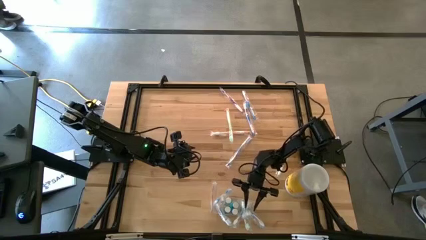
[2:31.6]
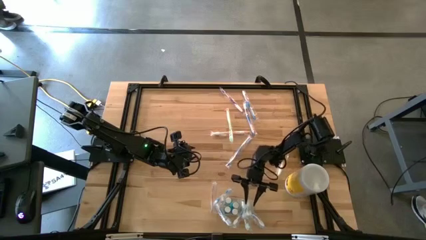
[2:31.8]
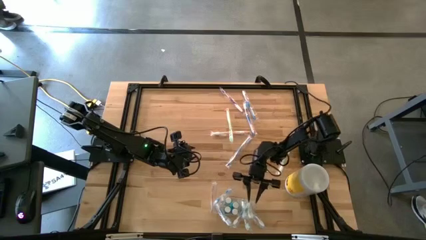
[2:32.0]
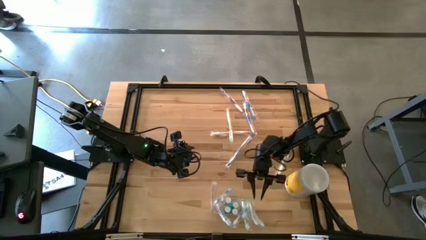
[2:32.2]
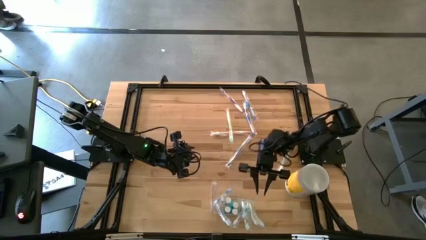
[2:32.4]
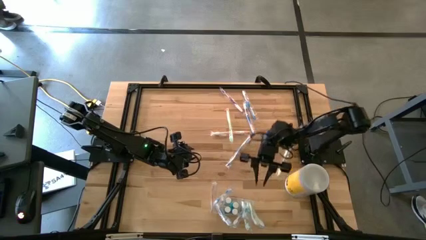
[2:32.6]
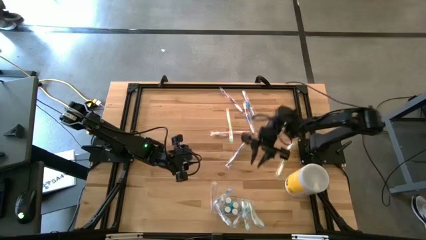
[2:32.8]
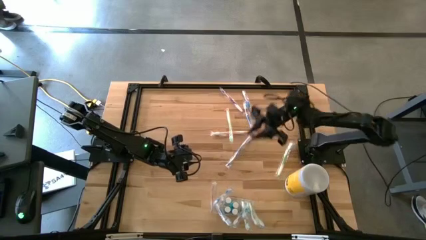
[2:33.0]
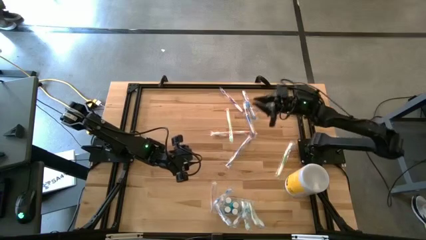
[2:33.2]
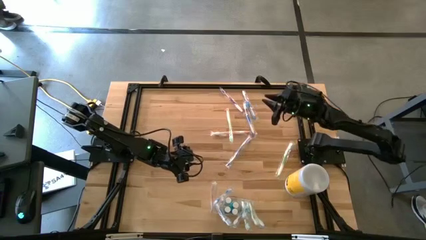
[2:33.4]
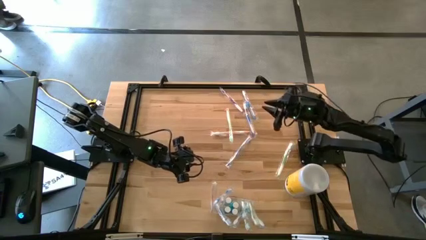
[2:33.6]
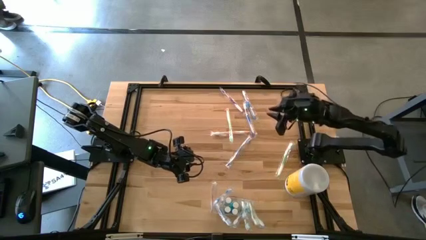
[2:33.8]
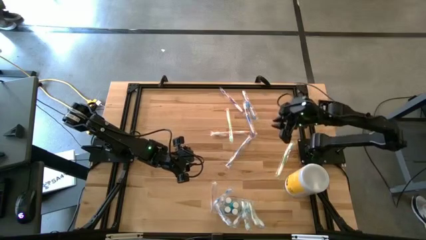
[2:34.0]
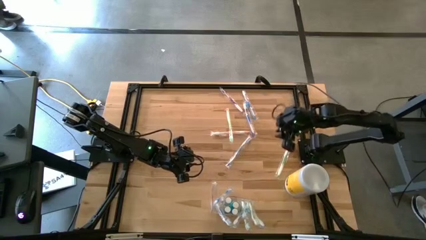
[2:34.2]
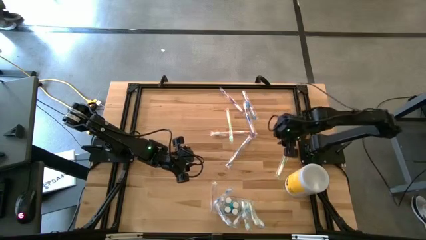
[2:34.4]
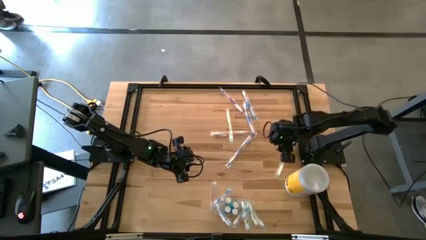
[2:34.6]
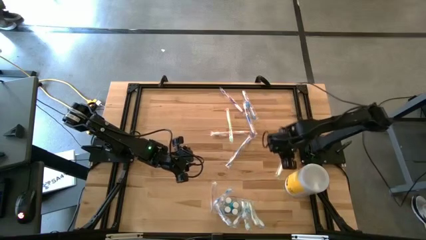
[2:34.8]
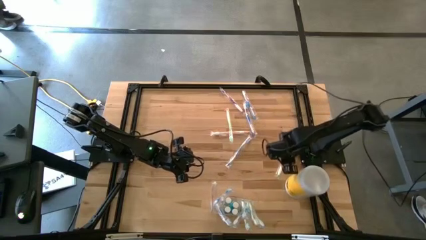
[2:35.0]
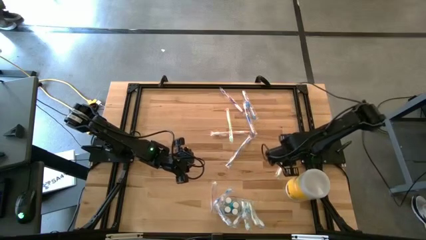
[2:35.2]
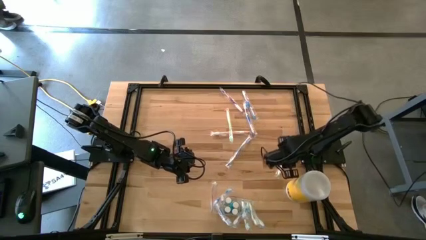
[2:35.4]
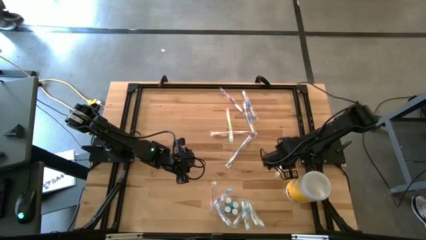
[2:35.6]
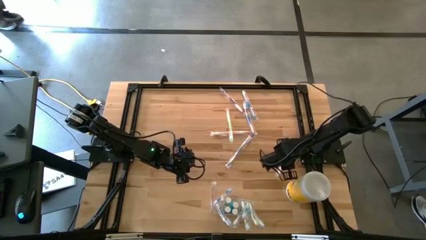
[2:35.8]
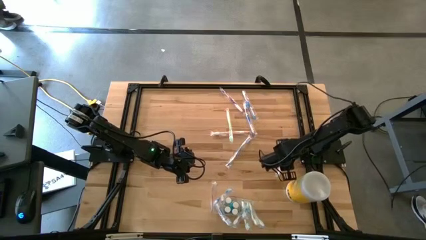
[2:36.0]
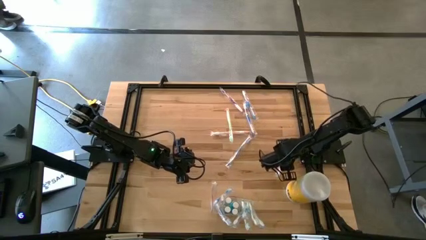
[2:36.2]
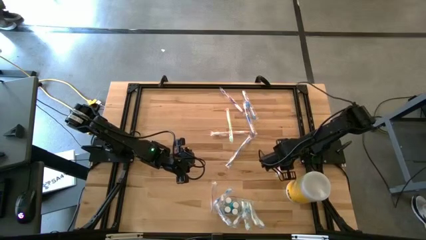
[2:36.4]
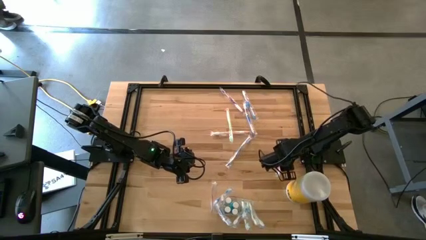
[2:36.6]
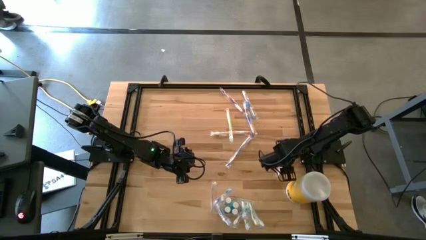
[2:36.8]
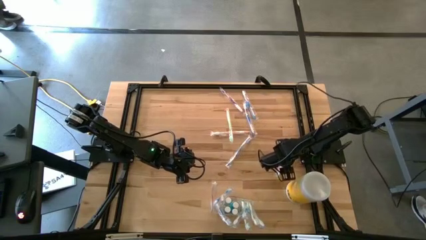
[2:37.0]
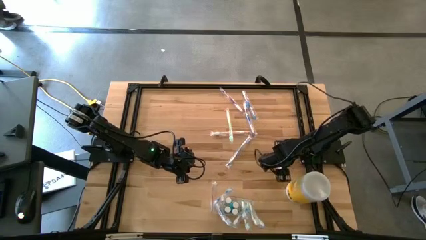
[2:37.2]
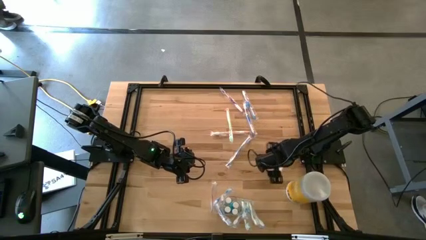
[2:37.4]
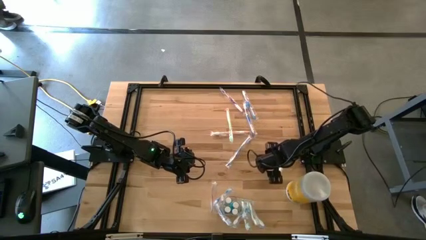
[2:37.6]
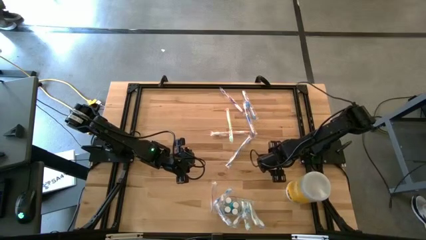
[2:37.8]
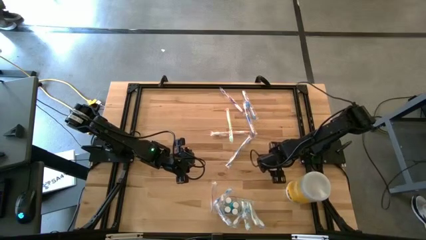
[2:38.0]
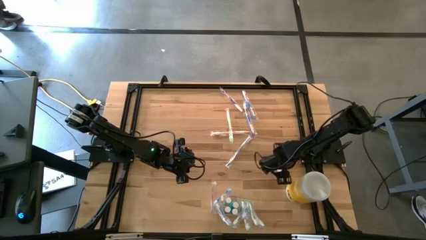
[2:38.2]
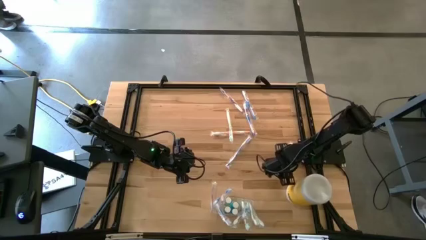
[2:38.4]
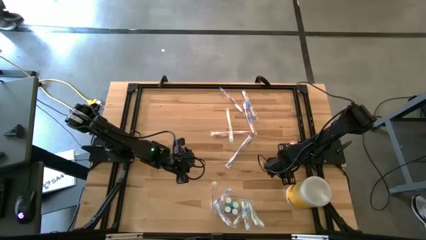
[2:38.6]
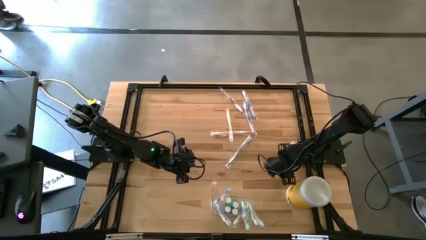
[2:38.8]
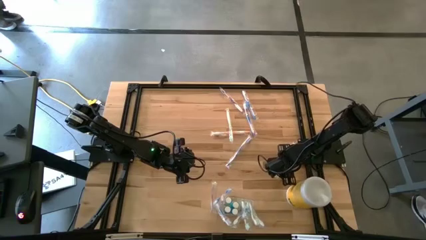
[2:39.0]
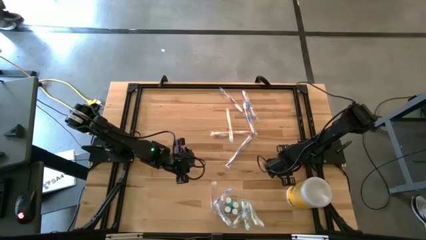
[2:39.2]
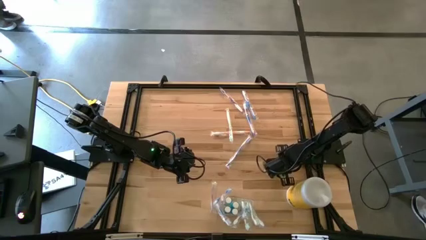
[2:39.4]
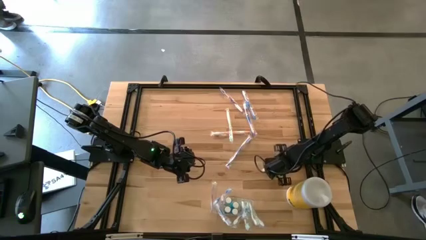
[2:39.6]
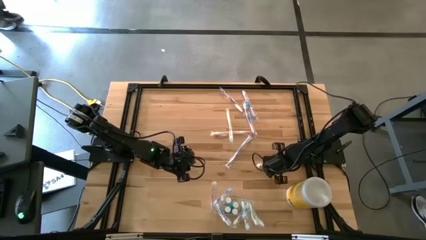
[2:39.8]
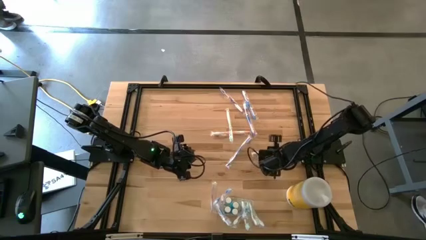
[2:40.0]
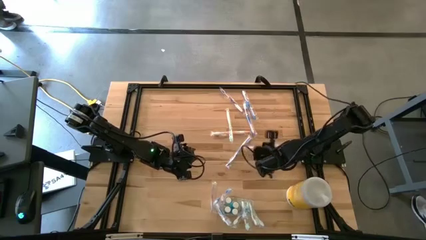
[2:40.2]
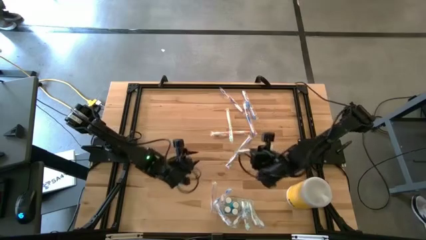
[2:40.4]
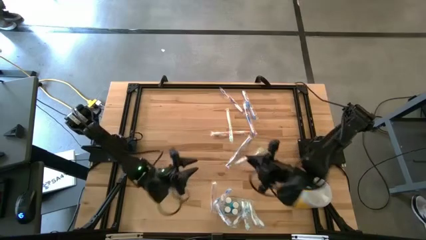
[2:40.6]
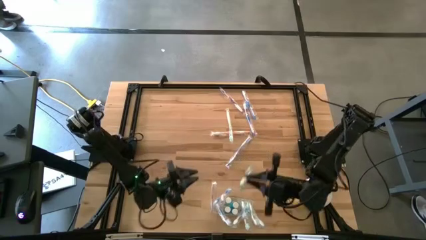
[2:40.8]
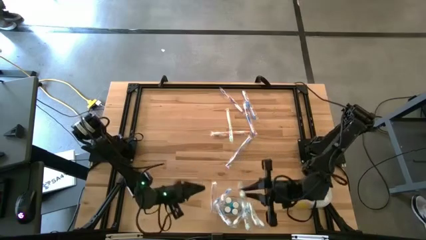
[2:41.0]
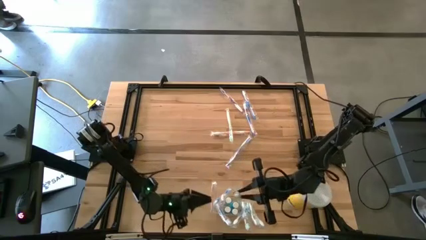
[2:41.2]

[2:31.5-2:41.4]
Task: Pick & Place toothbrushing station
Put the green toothbrush into the transparent organizer

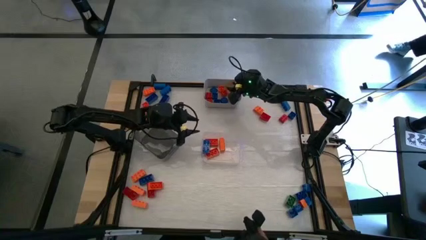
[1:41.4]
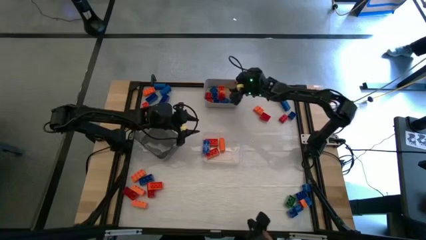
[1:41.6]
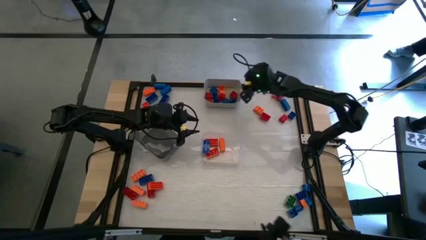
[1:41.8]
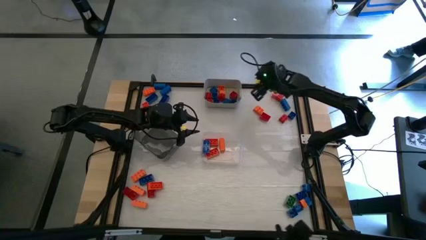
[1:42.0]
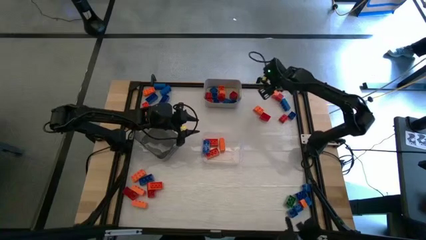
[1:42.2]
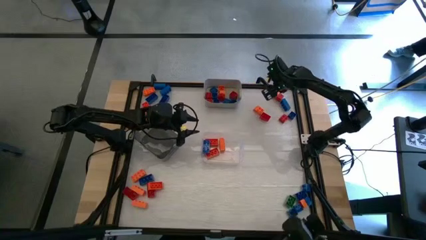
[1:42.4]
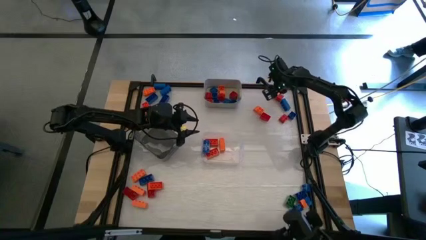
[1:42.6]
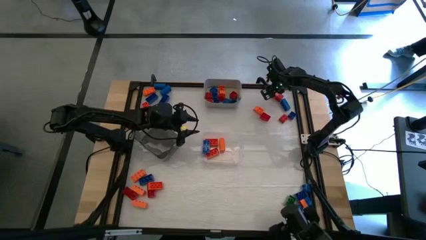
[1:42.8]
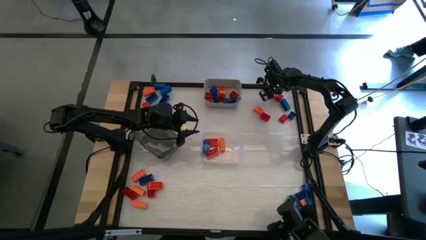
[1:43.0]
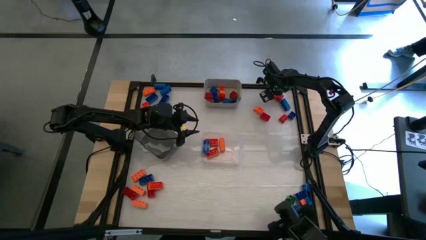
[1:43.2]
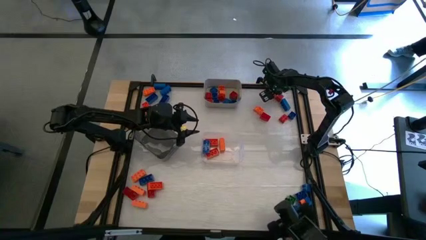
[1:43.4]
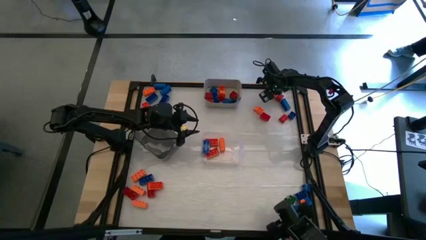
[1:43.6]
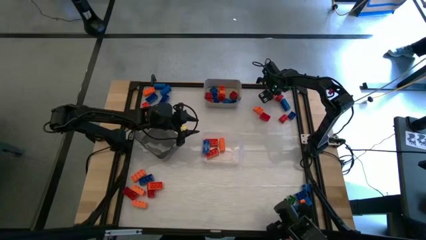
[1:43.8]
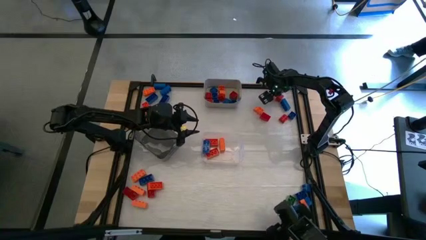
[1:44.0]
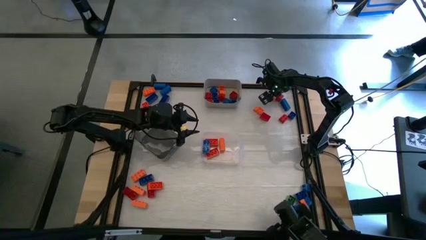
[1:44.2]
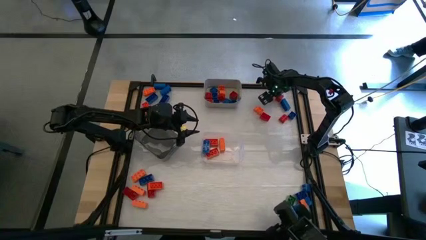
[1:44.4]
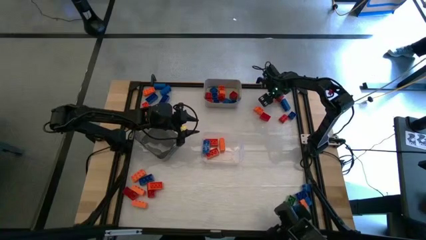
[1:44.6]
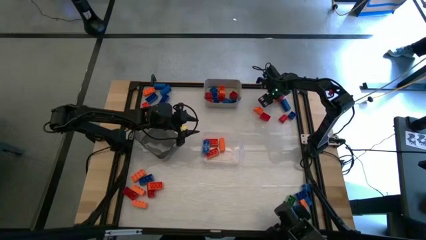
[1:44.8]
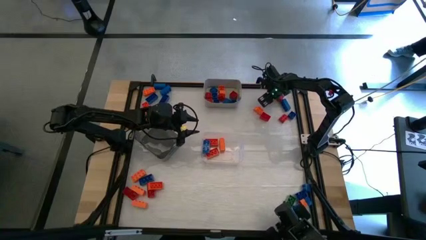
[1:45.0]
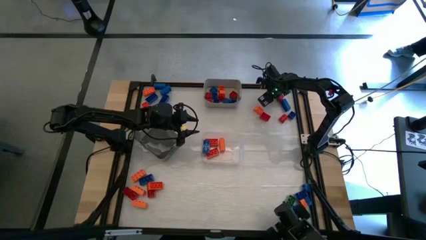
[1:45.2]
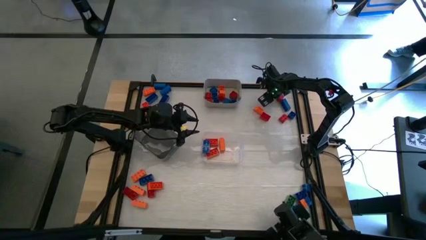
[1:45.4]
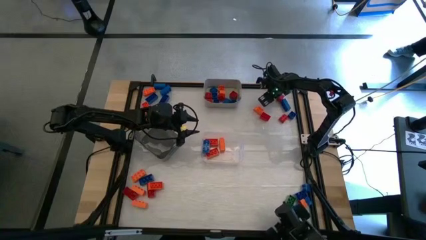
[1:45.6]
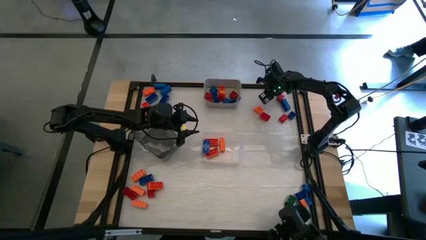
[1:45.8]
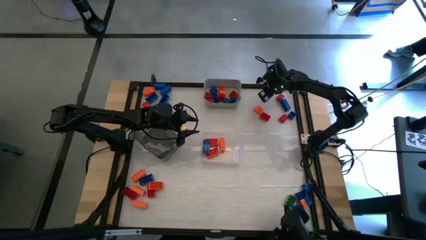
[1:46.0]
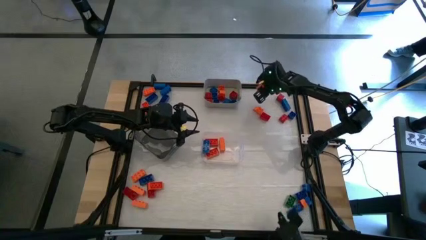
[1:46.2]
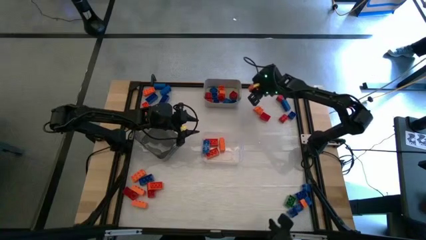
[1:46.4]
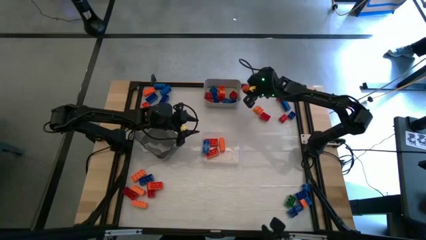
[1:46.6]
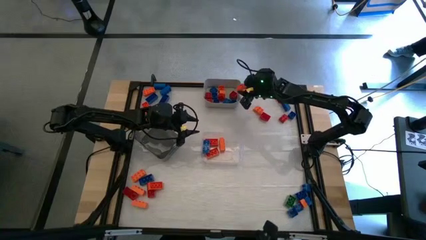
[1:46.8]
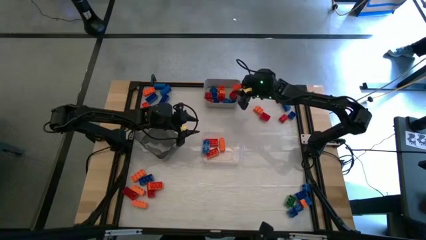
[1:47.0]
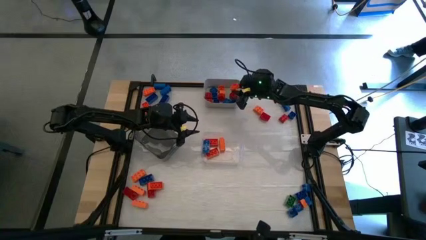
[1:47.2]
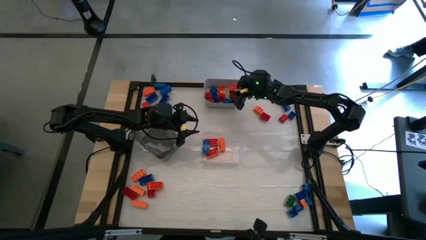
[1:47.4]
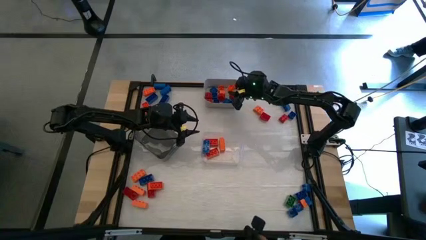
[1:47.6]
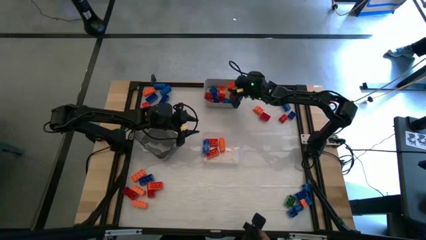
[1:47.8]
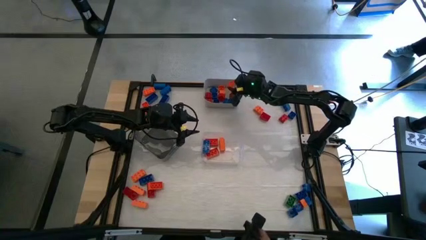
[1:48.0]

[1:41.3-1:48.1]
Task: Sort blocks by size
Put the small orange game piece into the gray bin

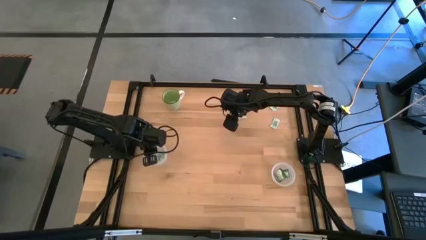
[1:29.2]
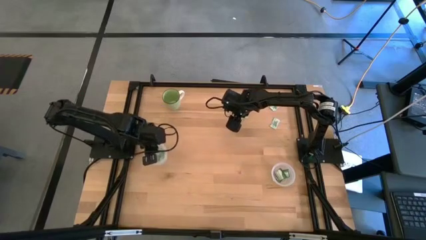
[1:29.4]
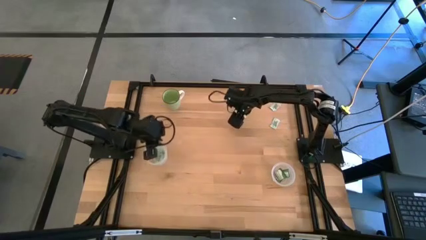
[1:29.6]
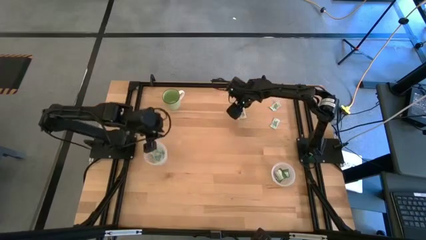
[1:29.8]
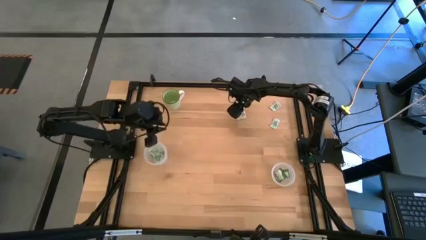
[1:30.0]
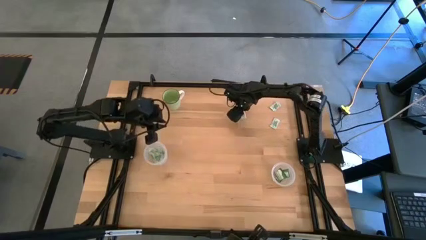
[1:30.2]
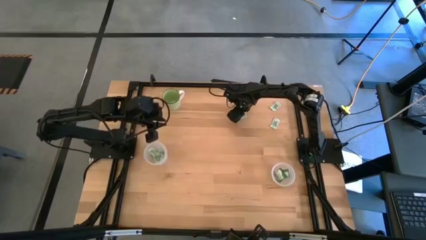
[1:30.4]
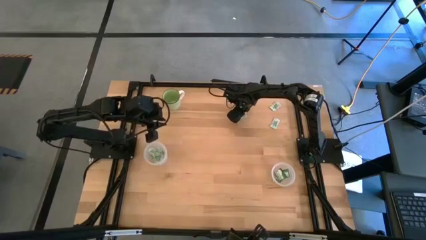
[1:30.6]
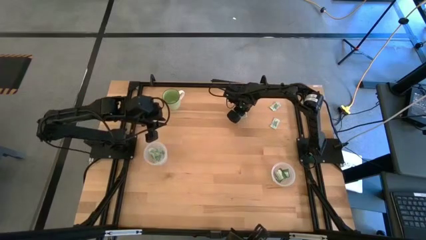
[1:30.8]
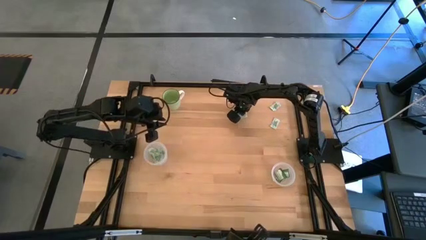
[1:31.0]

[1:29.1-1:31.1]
Task: Pick and place items into bin
Put the stevia packet into the left transparent bin
